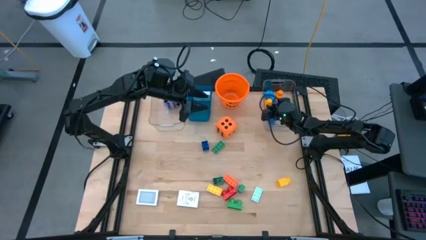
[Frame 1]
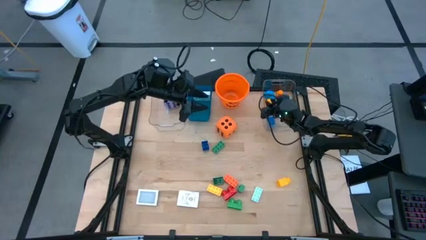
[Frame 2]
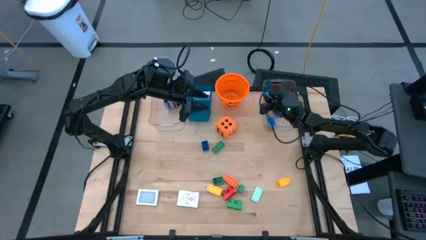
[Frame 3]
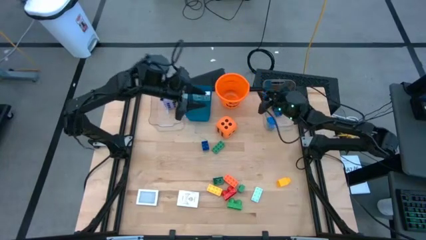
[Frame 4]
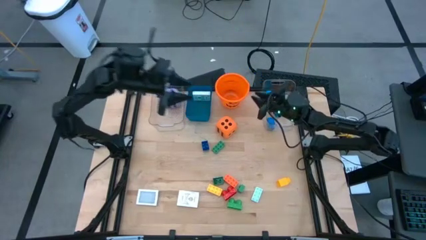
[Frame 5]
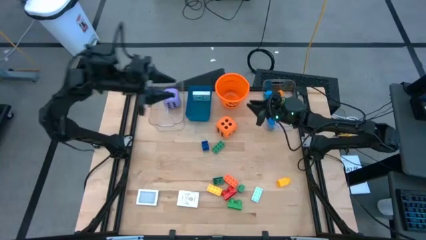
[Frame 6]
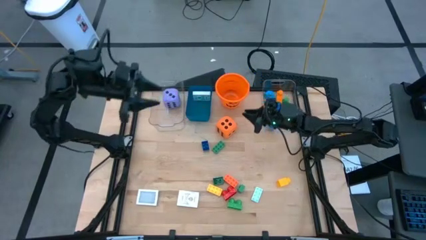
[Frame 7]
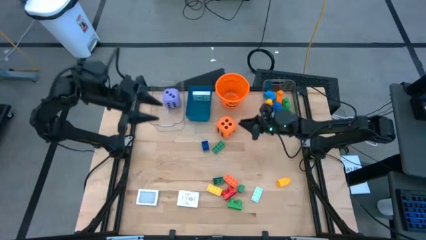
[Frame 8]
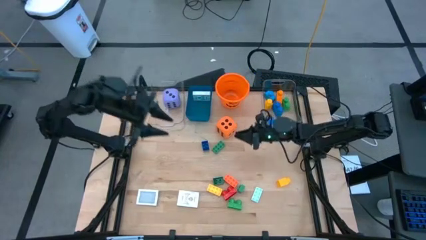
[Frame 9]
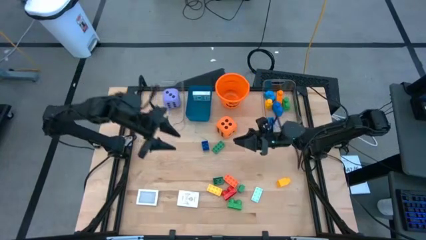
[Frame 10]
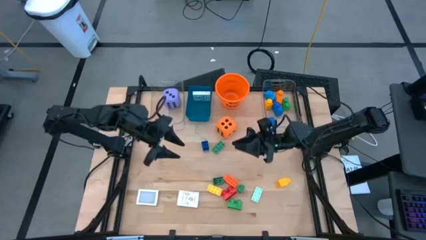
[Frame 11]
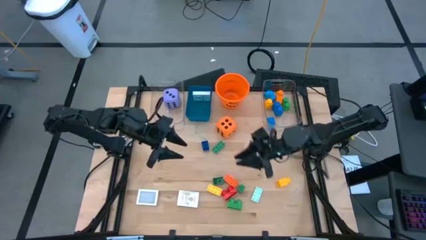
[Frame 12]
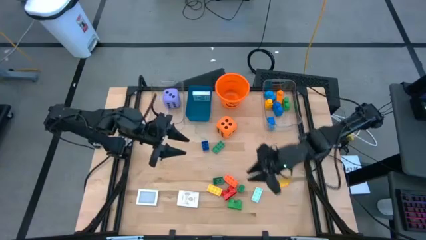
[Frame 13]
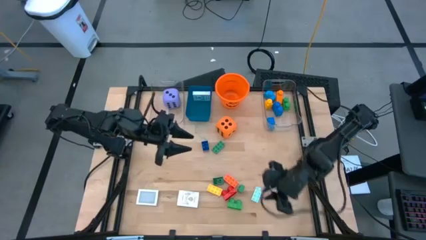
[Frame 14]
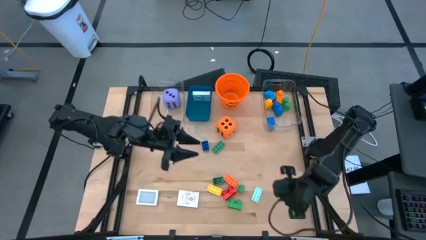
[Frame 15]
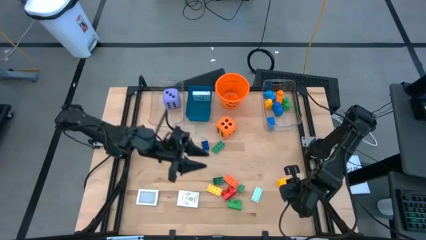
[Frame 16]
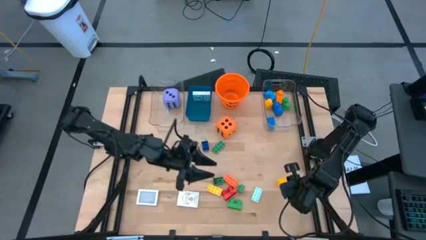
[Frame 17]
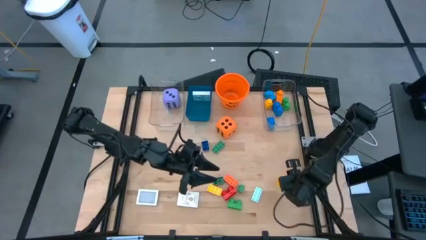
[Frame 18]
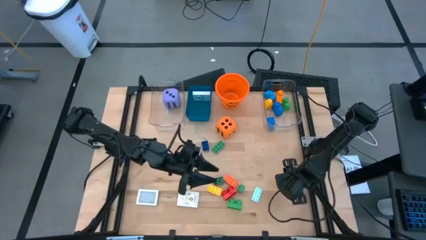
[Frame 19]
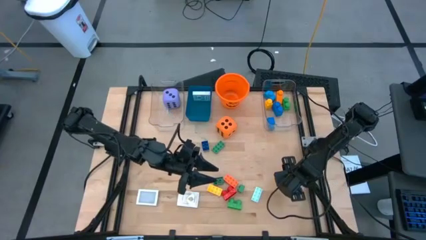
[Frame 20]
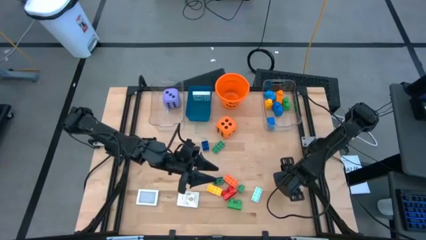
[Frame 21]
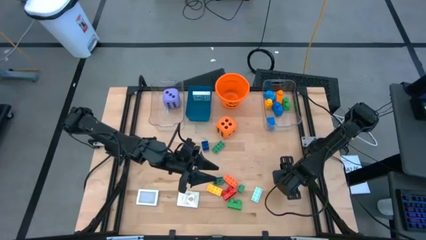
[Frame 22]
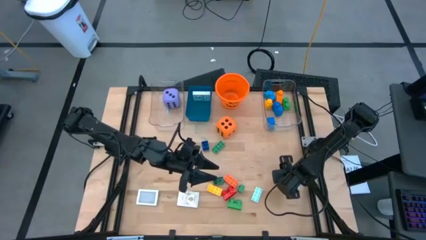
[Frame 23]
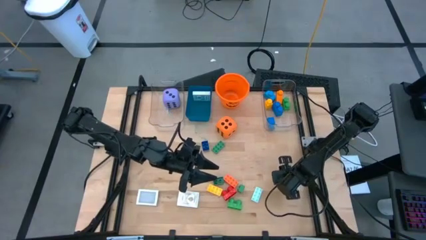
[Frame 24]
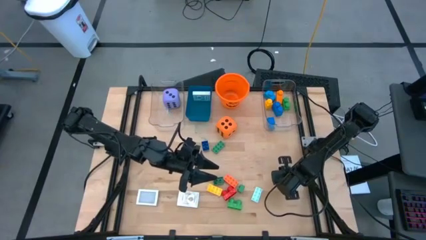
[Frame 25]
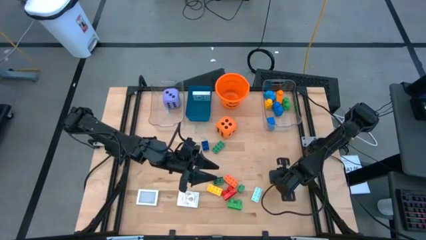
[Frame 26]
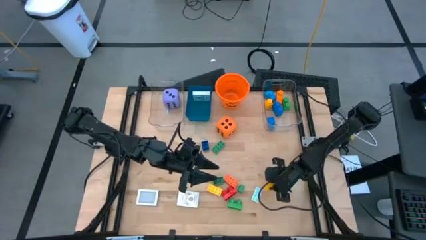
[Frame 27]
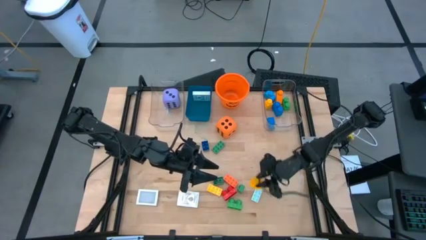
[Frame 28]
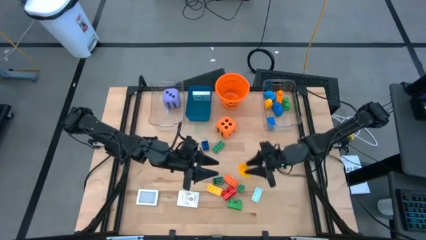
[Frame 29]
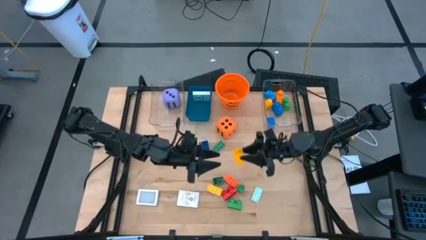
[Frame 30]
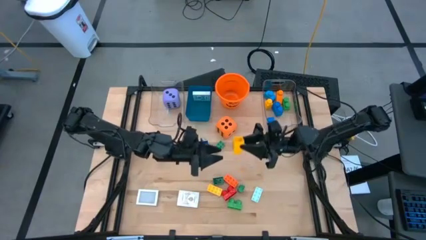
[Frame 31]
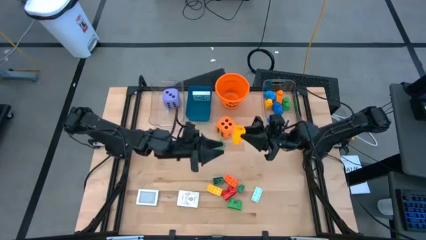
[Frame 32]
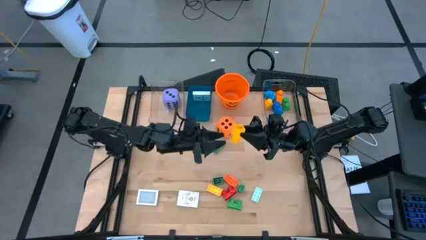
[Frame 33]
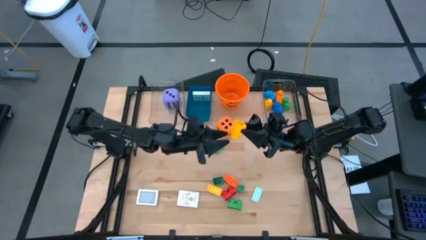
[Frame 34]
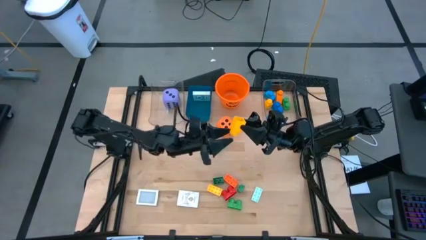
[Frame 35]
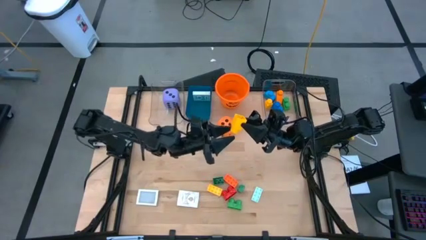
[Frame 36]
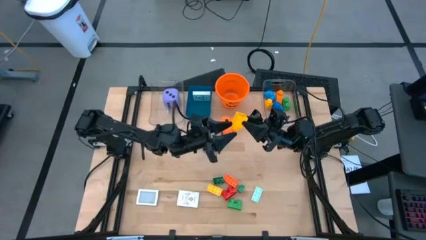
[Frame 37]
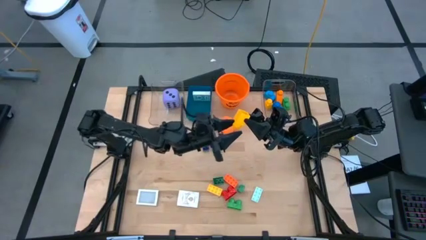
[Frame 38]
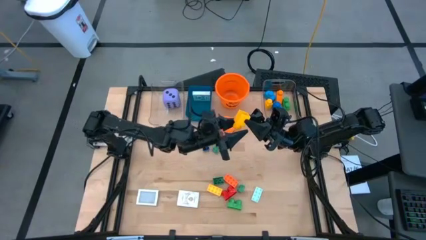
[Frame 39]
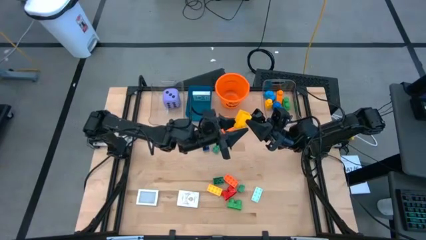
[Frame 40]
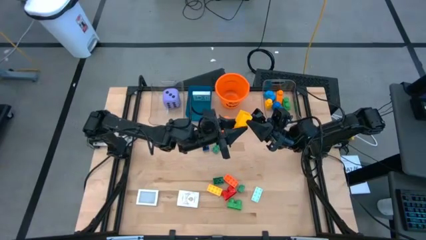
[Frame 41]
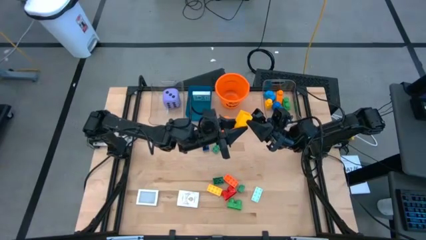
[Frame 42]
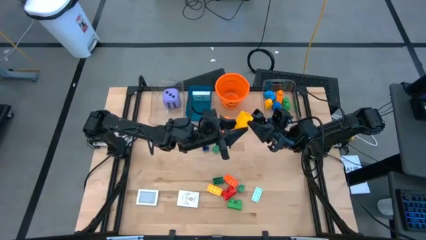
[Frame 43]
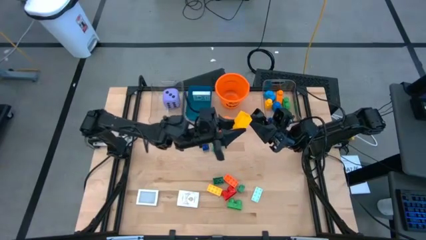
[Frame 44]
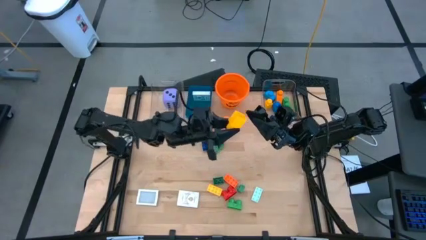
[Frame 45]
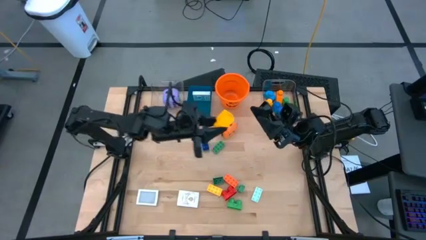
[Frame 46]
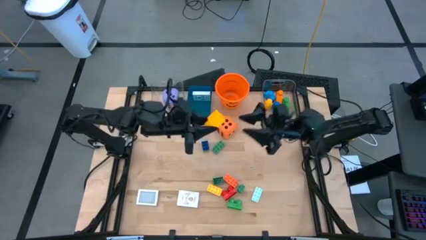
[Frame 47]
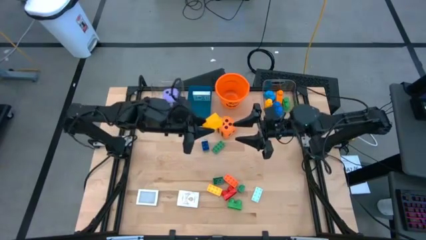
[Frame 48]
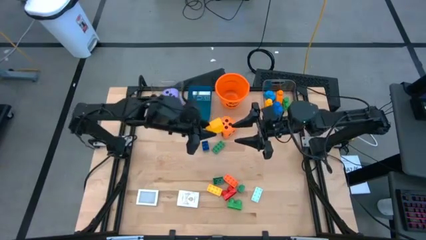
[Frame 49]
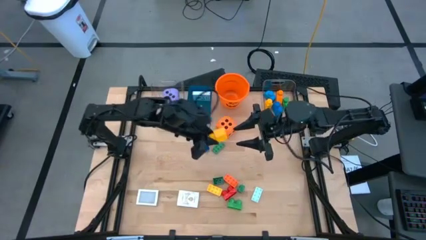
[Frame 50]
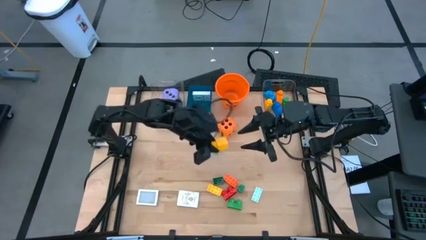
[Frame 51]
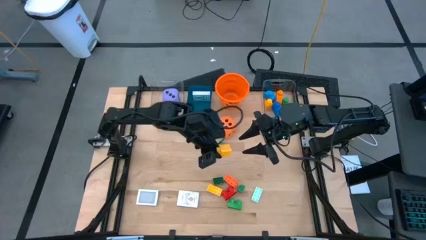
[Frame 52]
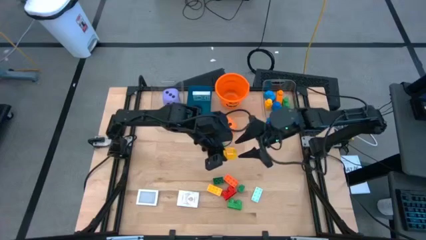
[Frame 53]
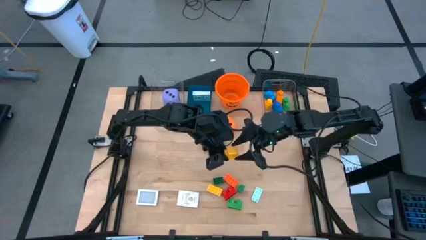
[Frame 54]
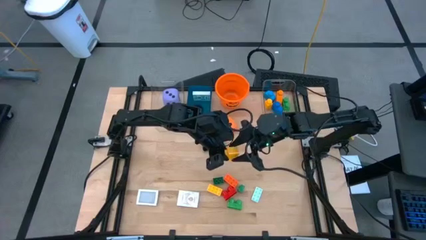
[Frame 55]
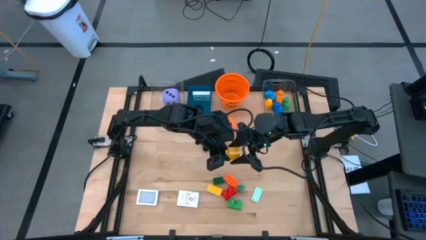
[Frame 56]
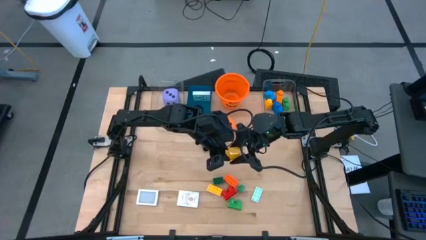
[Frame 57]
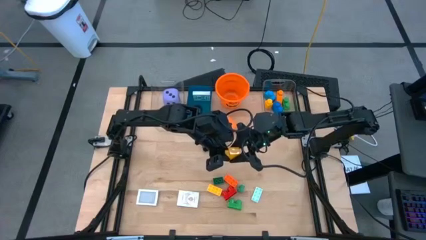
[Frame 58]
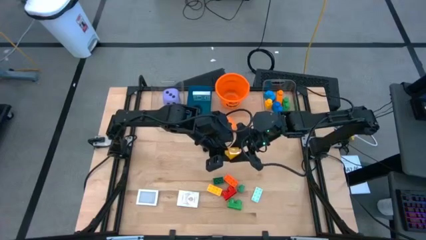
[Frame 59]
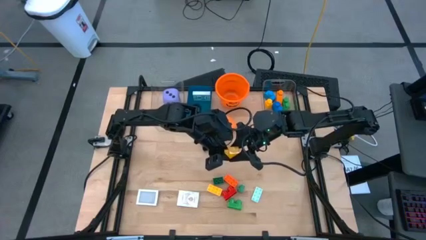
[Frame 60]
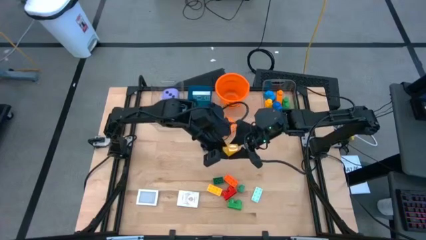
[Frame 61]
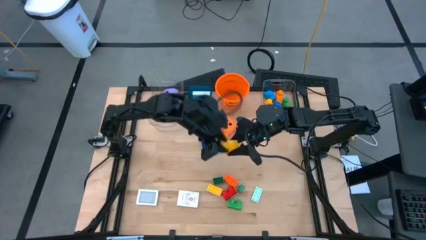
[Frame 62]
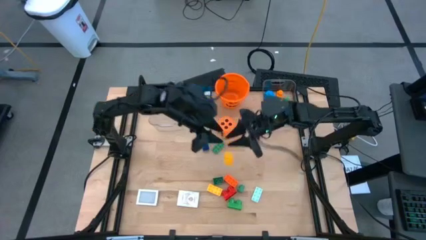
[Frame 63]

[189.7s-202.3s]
Task: Pick & Place Toys
Put the yellow game piece into the right transparent bin

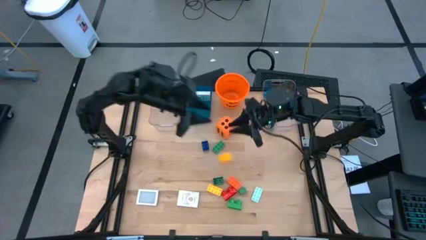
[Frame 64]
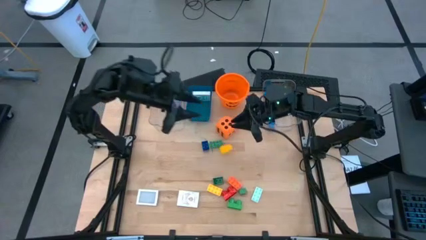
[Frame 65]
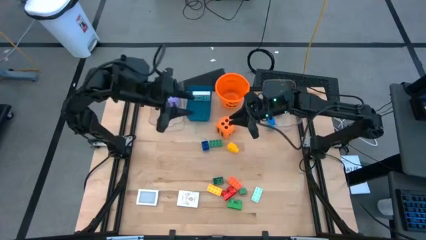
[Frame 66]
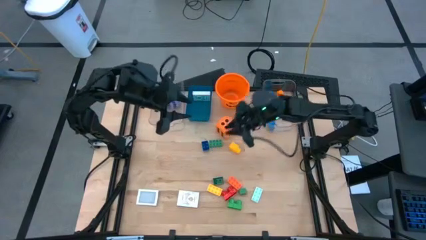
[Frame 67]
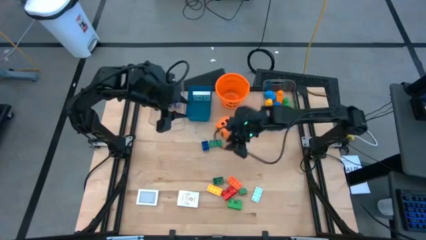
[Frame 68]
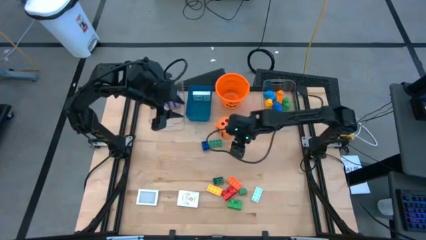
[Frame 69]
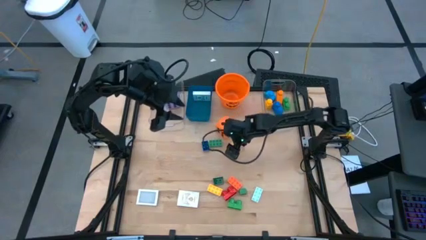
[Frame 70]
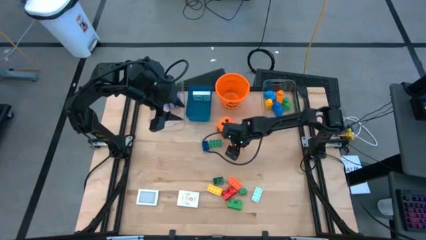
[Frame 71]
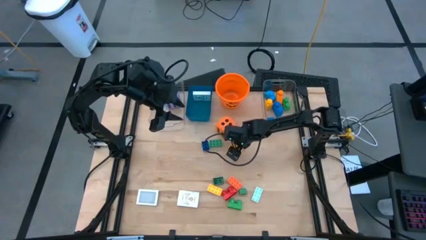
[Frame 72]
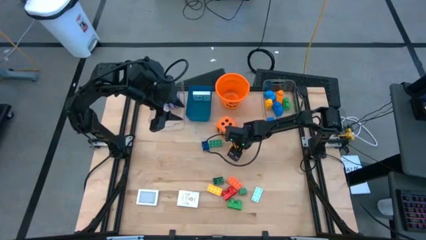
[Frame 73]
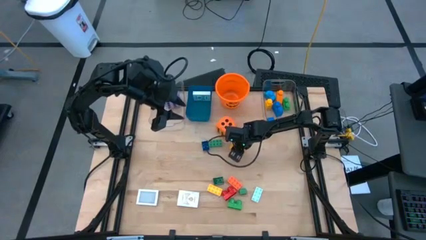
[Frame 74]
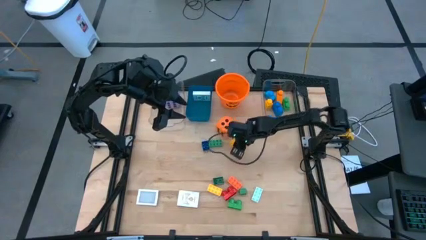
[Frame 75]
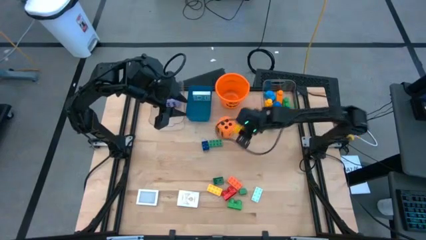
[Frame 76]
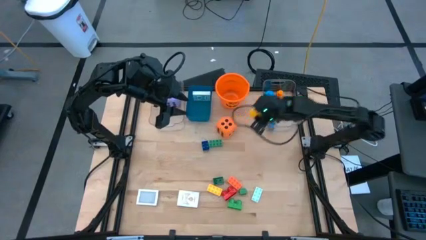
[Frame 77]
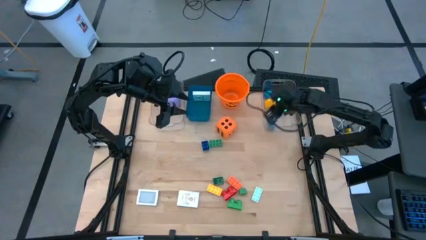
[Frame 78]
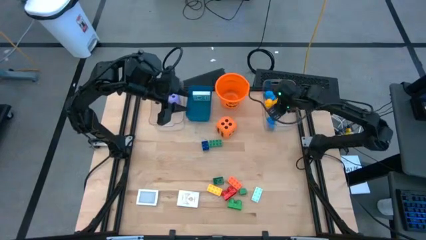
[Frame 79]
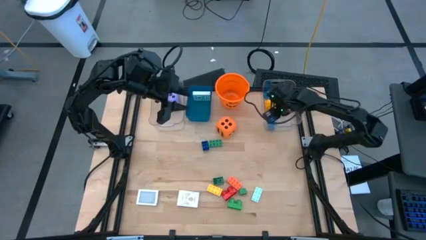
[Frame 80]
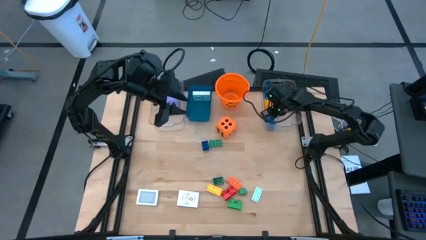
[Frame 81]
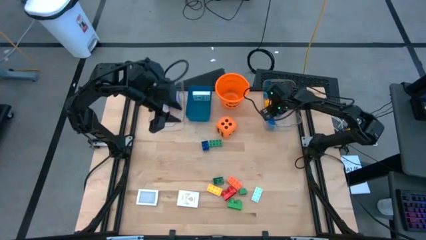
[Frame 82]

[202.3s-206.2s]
Put the yellow game piece into the right transparent bin
